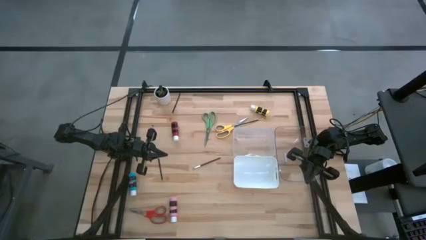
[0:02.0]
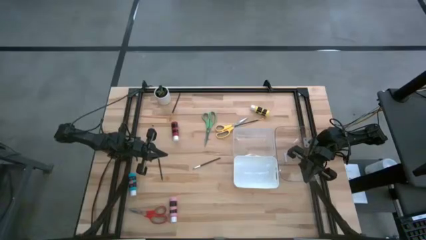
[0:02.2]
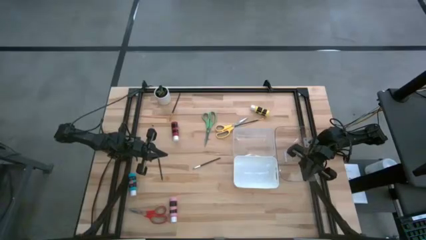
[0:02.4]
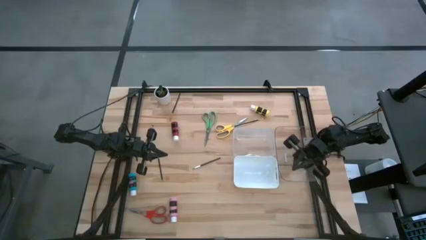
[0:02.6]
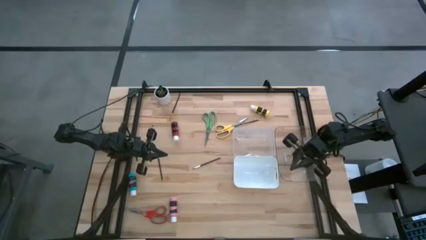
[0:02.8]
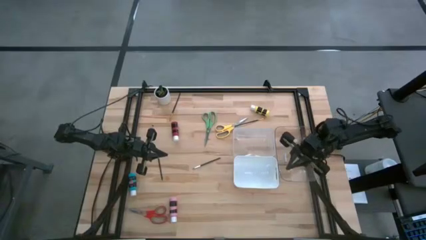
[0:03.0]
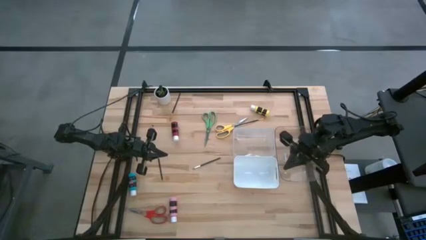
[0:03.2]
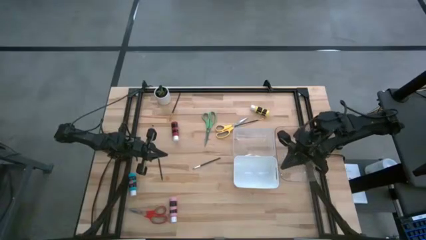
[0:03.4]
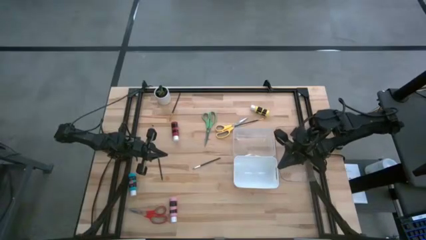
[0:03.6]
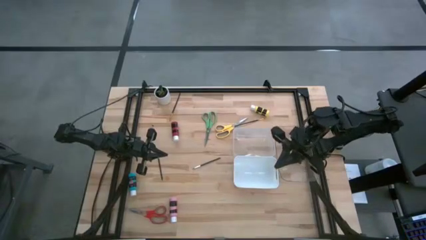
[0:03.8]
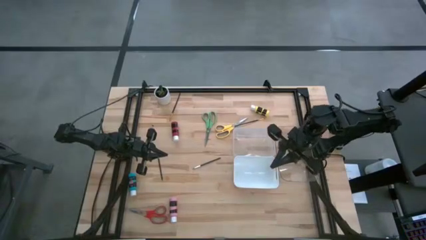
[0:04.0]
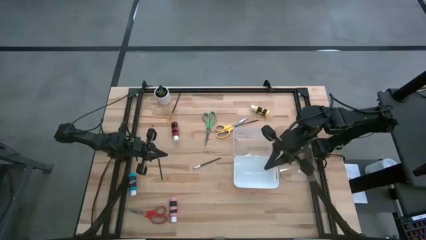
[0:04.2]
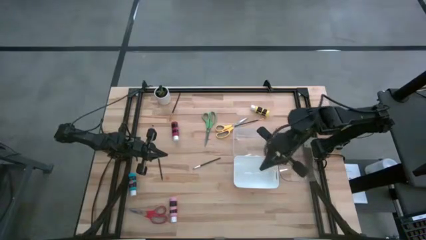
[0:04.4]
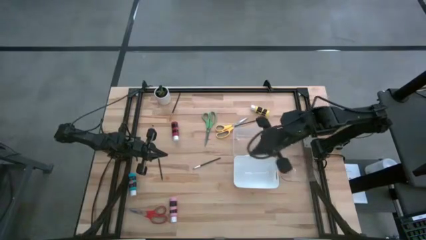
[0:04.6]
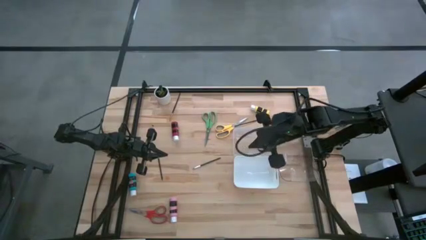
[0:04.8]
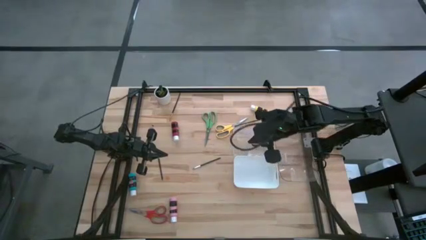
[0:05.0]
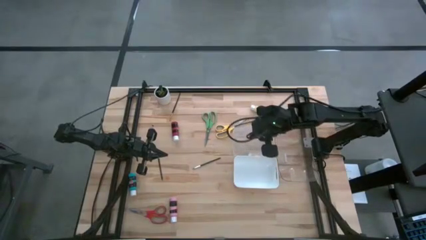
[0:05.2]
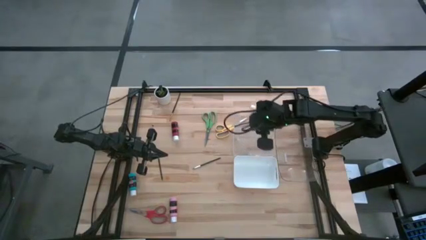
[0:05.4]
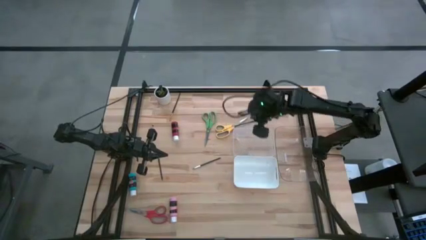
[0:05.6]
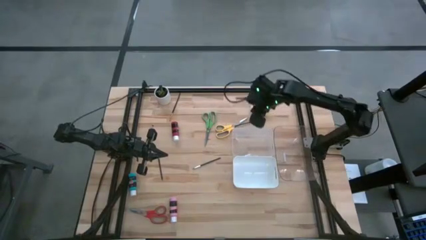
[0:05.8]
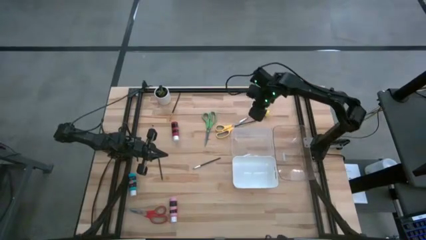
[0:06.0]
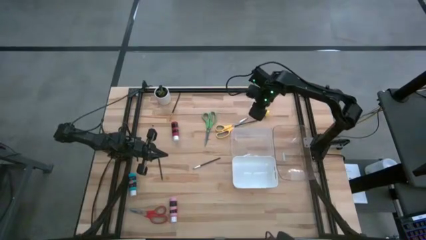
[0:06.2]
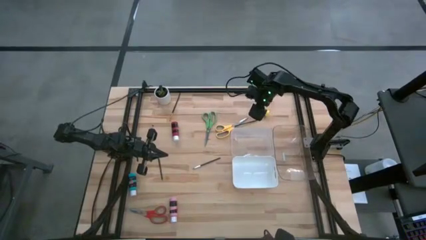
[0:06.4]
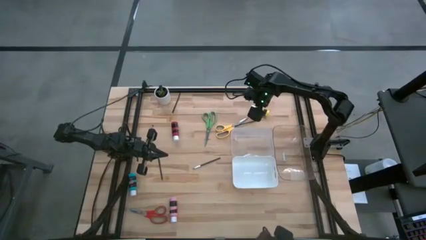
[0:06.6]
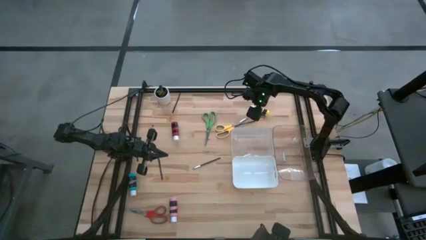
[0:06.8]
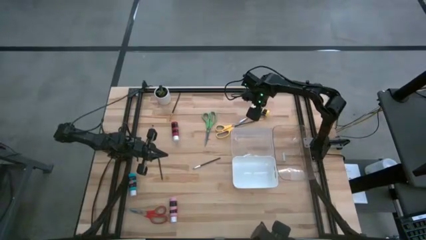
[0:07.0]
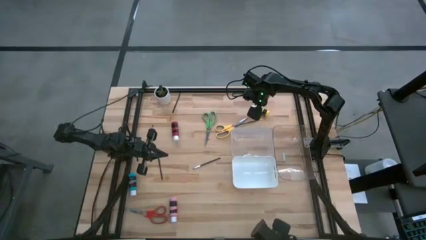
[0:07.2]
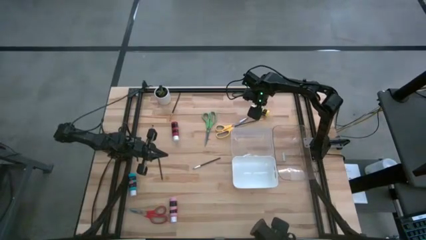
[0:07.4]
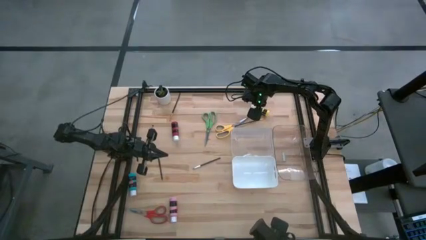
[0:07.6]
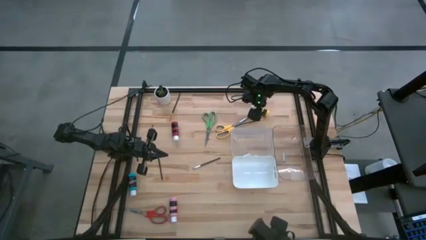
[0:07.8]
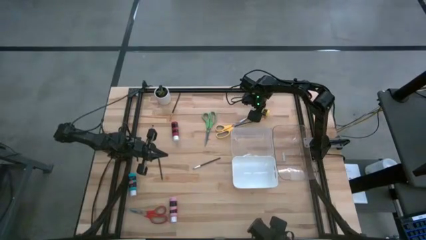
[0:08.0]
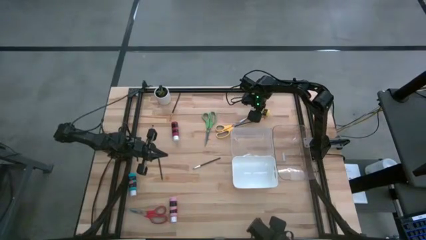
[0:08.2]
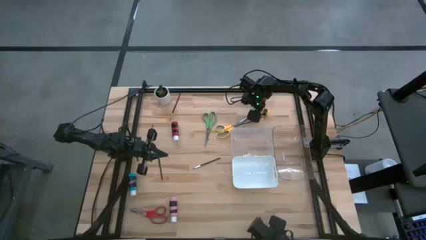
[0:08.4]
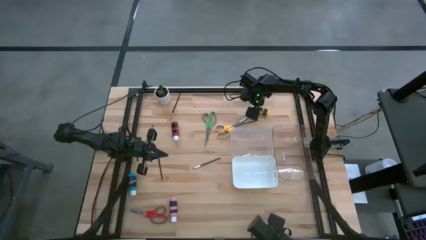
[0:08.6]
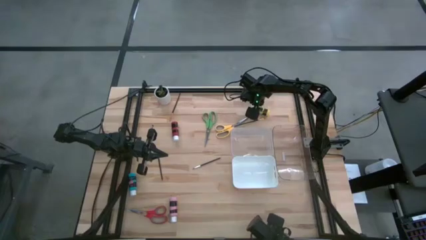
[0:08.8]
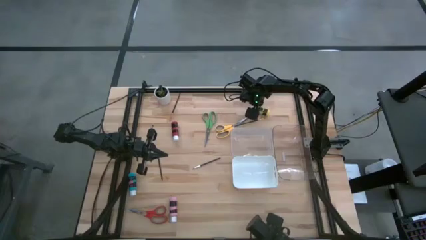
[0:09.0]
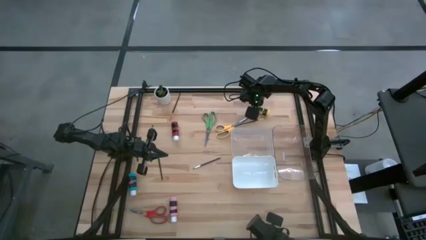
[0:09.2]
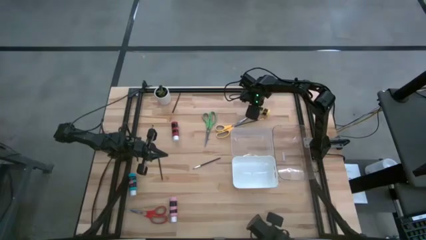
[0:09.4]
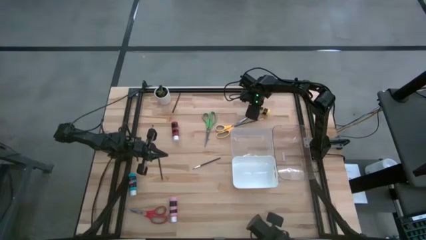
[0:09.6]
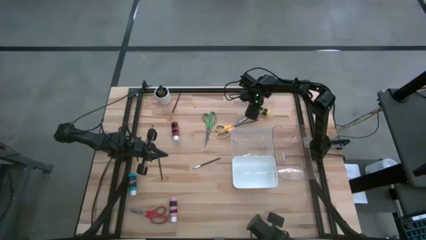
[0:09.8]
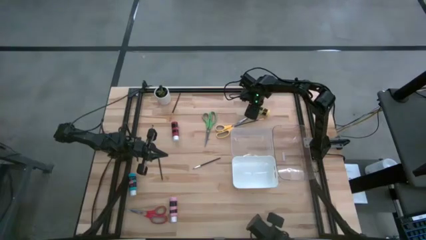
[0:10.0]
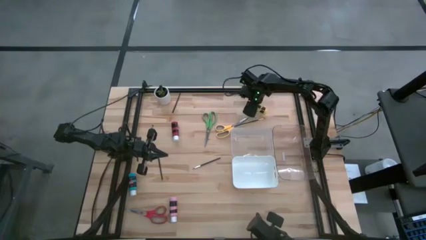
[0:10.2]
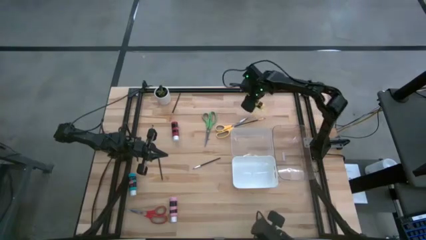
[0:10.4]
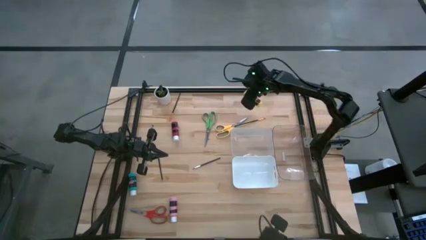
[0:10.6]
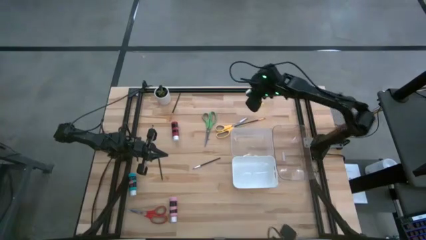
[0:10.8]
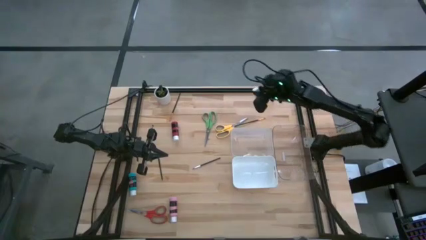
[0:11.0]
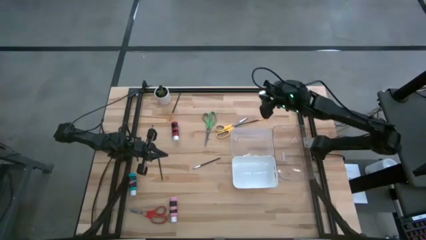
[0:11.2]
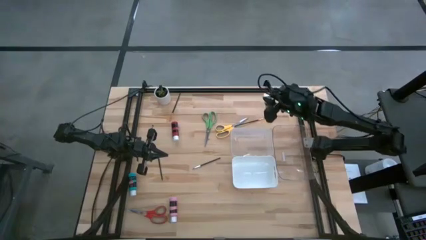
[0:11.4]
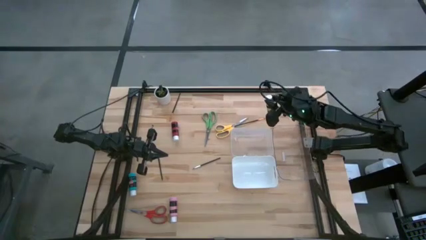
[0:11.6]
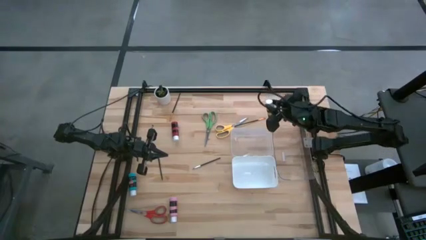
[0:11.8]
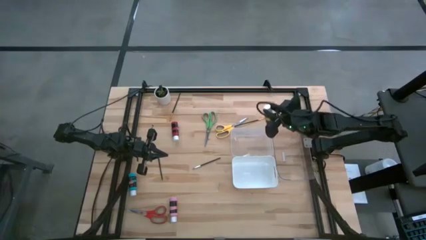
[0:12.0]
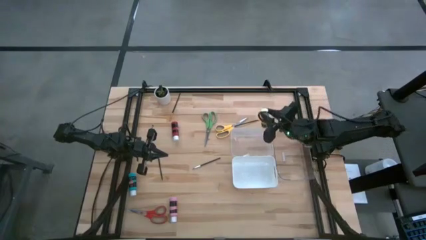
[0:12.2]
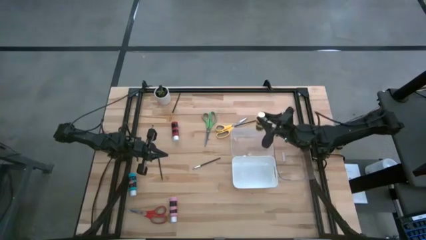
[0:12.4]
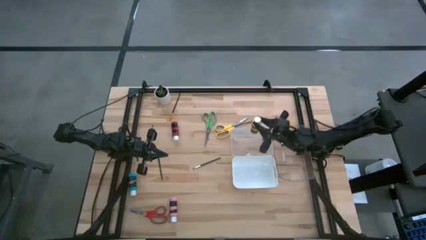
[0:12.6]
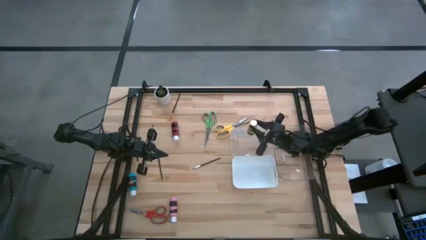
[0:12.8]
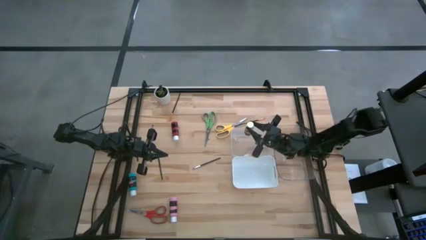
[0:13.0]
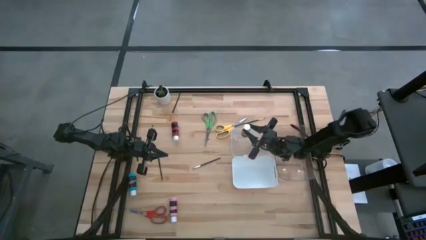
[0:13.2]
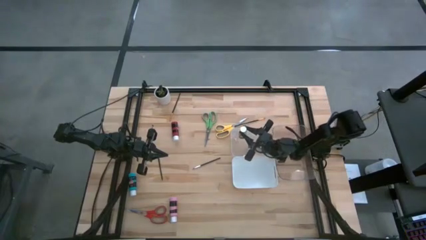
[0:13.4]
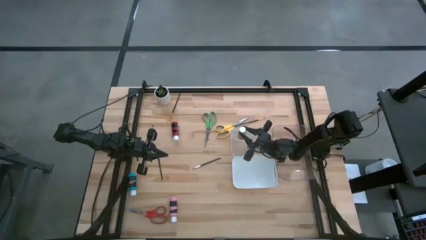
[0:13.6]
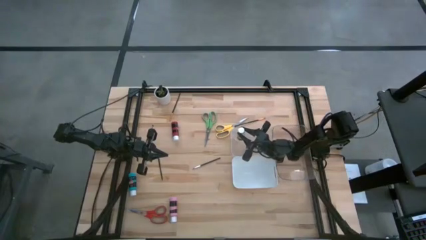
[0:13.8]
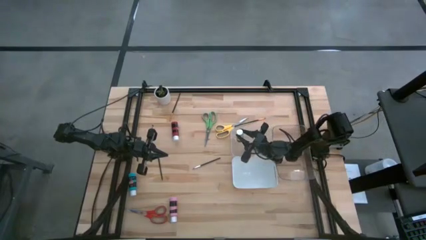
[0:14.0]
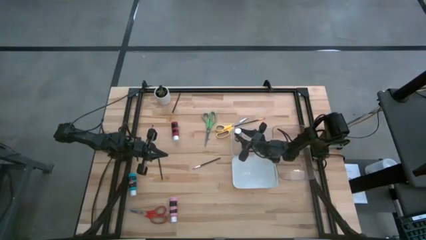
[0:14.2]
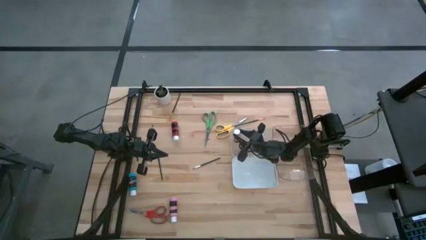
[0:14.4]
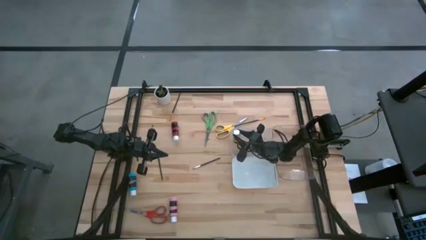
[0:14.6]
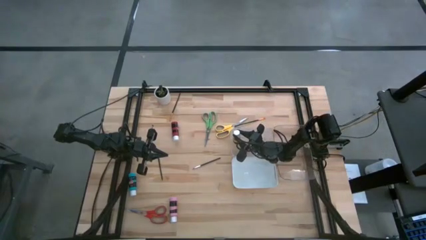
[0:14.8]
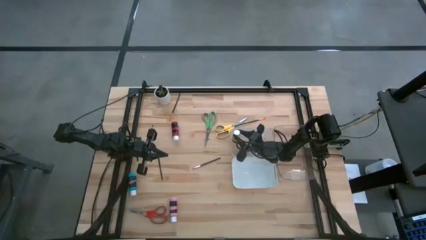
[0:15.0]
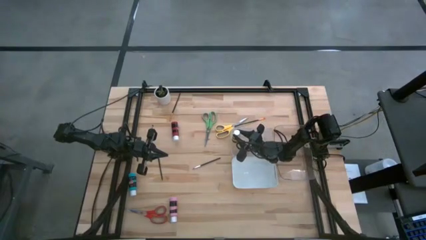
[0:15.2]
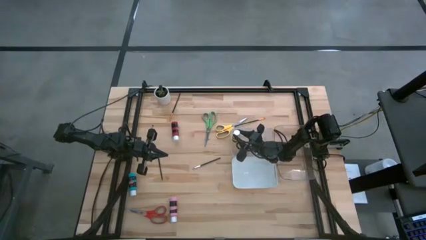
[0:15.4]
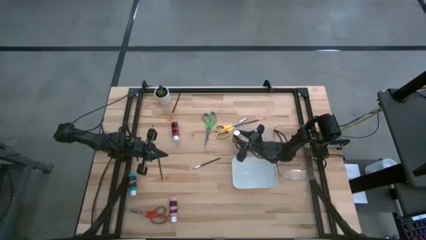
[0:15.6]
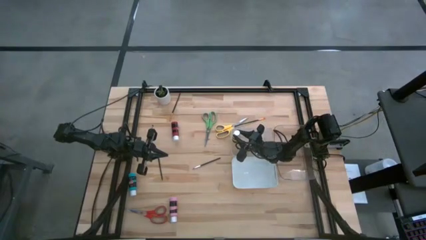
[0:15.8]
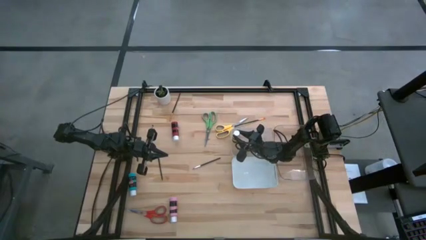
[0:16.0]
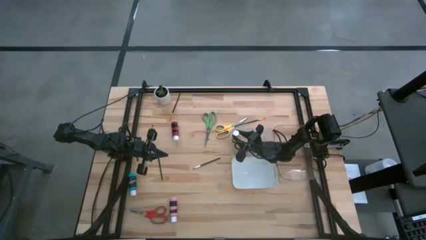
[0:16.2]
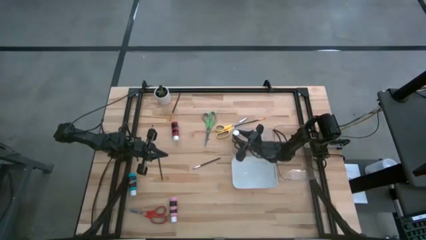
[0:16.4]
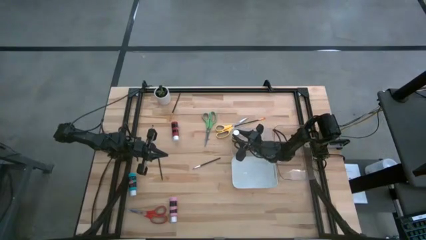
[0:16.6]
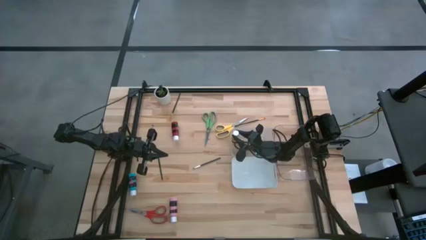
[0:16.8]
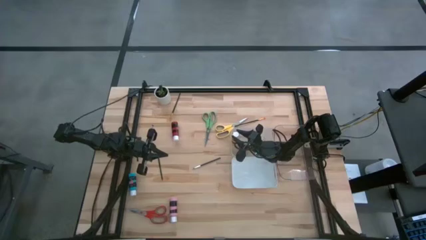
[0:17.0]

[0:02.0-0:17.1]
Task: Pick & Place Paint Supplies
Put the yellow paint bottle into the left transparent bin
